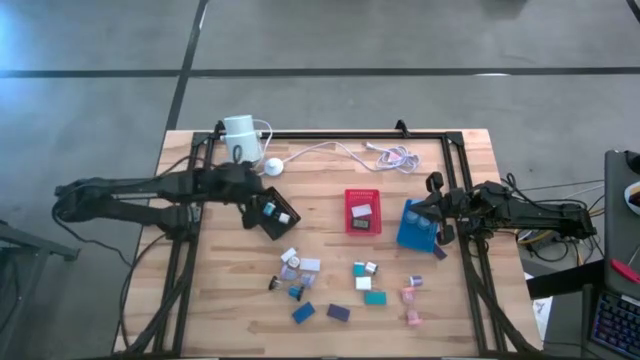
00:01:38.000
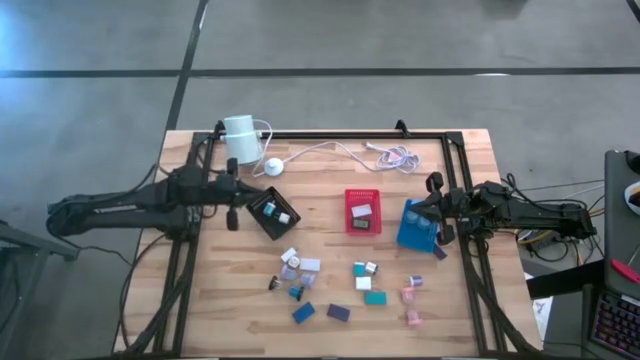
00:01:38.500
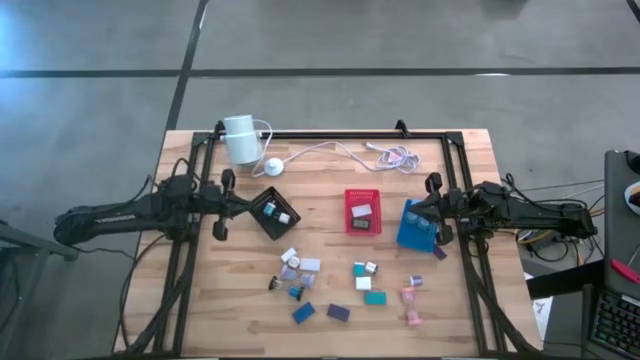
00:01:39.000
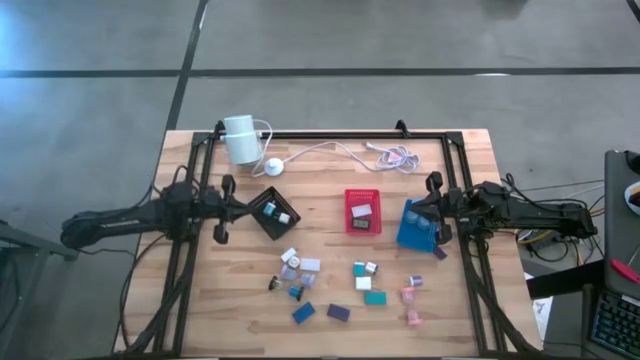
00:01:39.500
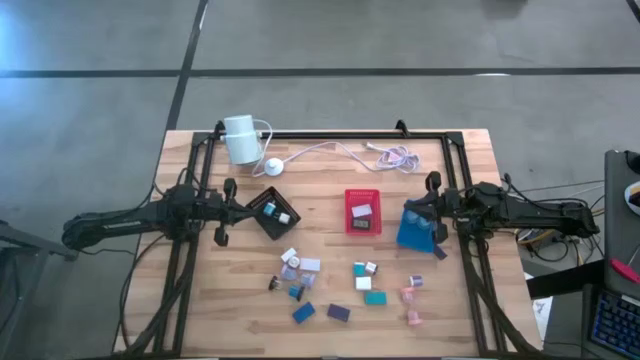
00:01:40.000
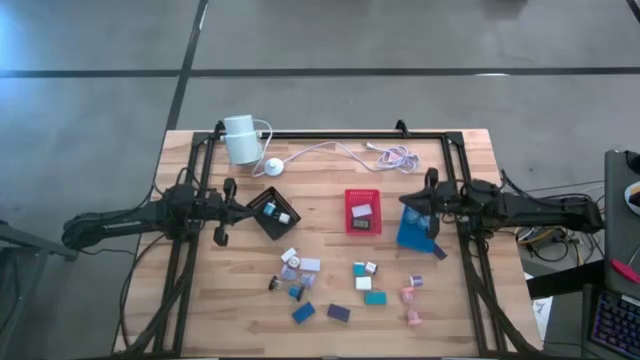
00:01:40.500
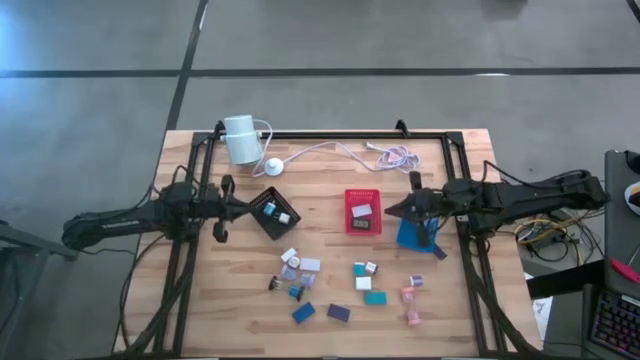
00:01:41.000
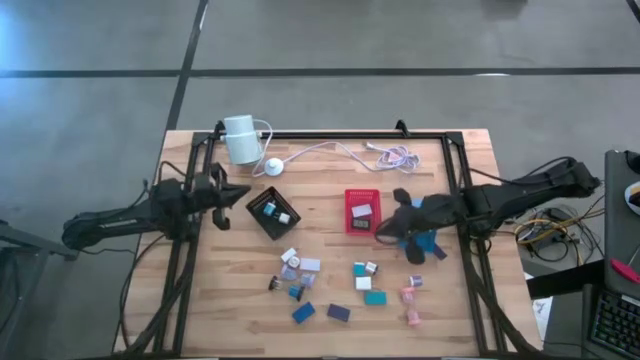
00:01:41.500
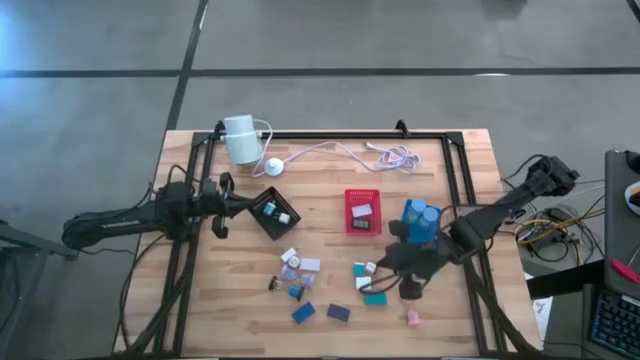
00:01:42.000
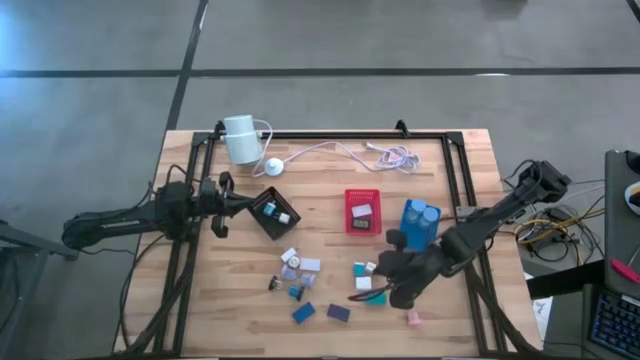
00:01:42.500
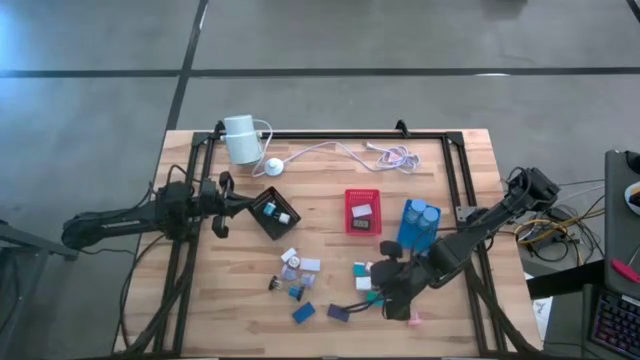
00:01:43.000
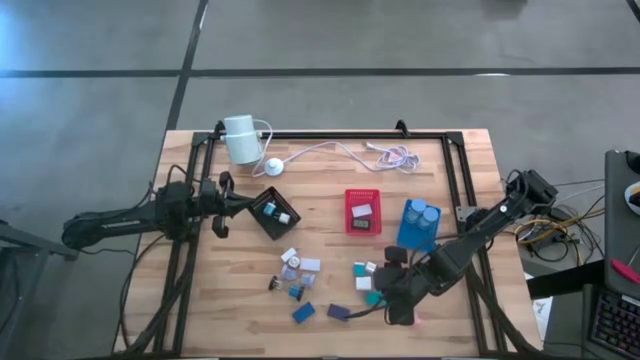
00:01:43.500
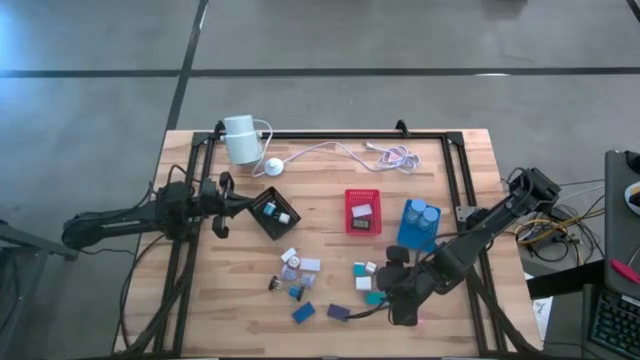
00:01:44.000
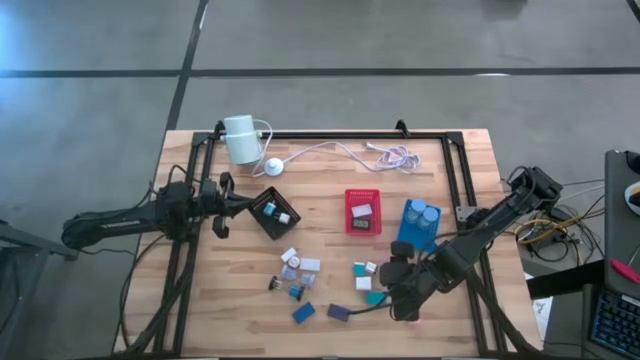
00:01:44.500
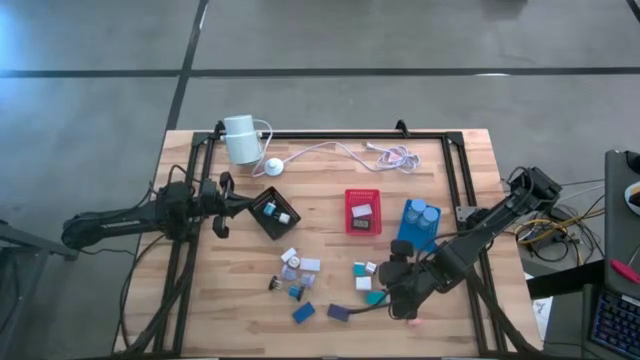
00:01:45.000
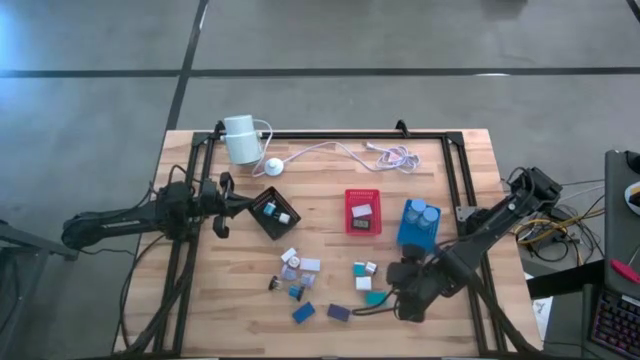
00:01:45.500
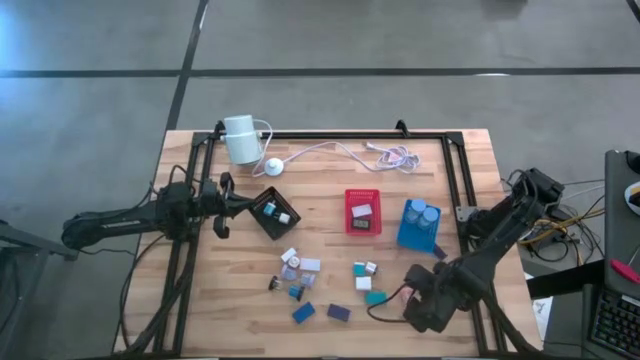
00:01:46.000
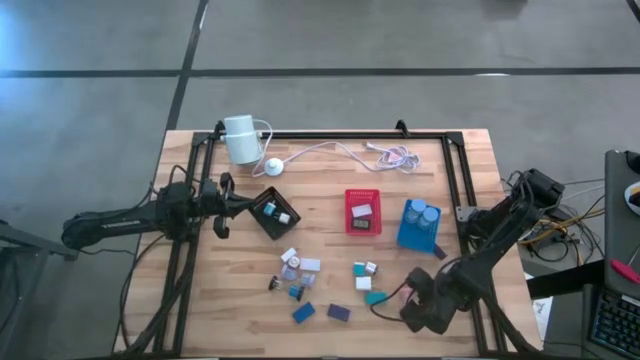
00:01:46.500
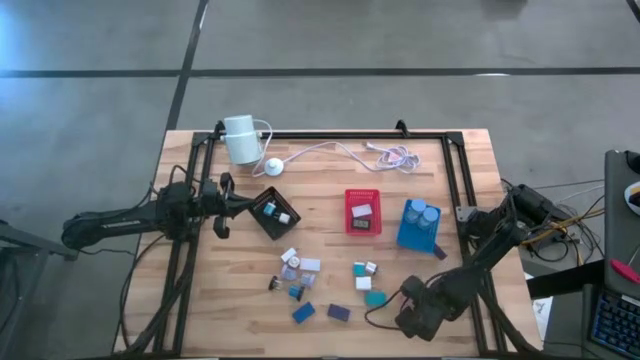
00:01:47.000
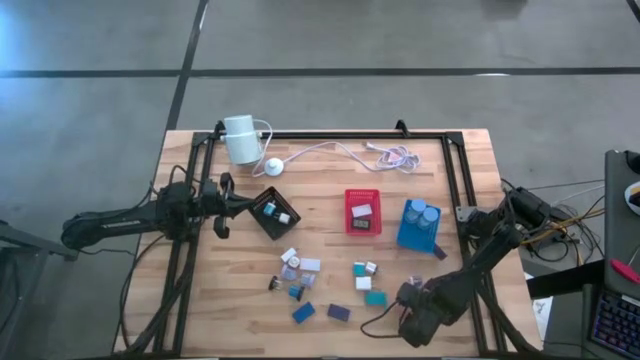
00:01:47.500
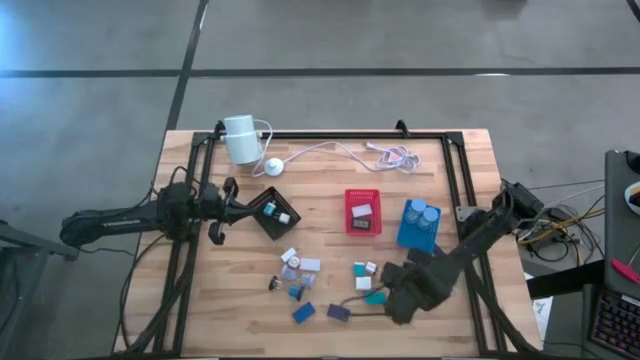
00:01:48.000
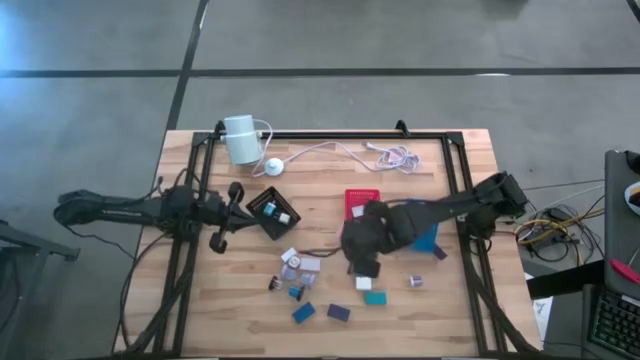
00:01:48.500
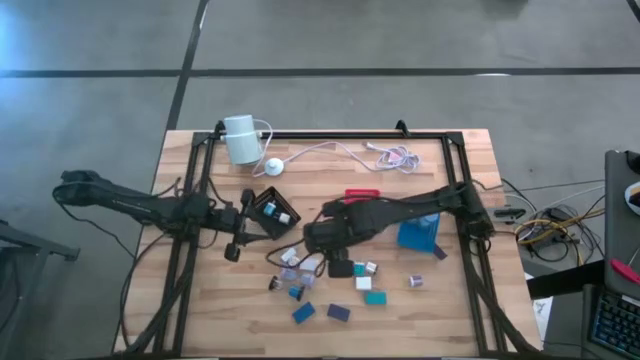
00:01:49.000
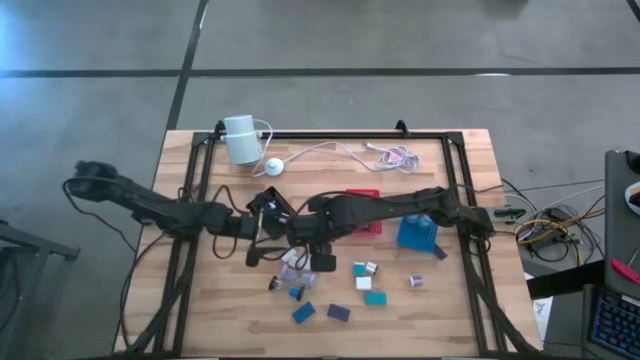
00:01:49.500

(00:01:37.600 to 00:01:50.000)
Task: Pick & Place Office items
Put the pink hourglass into the blue bin

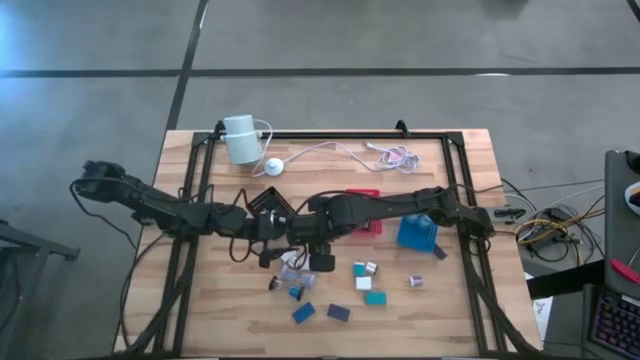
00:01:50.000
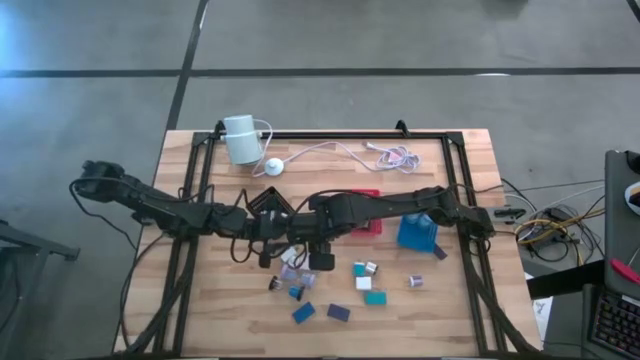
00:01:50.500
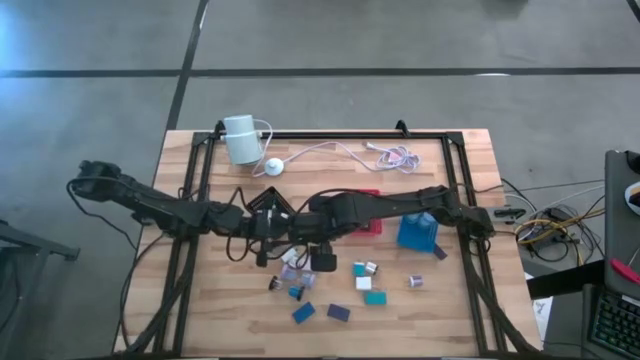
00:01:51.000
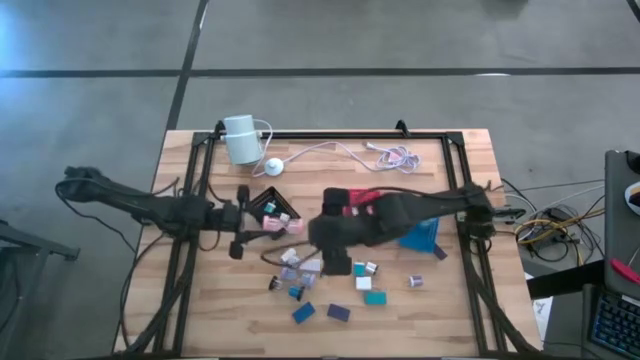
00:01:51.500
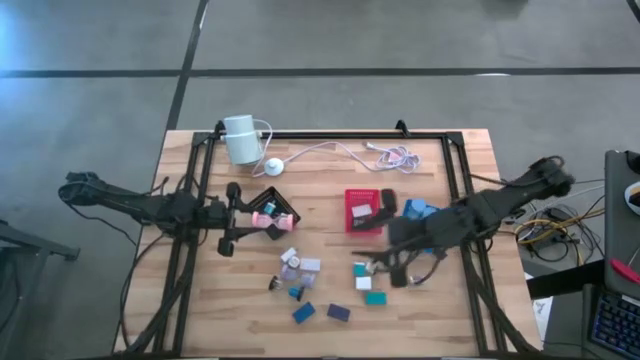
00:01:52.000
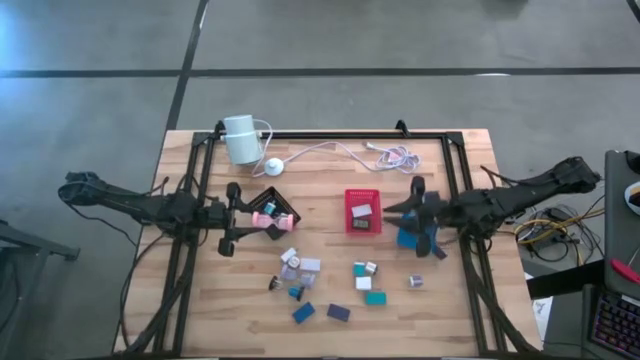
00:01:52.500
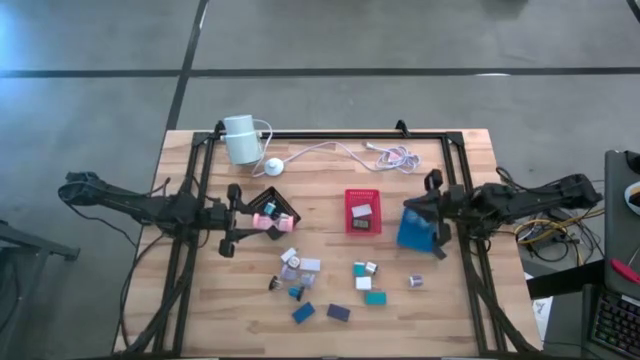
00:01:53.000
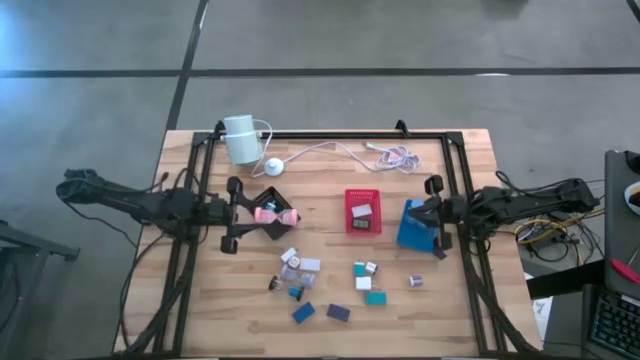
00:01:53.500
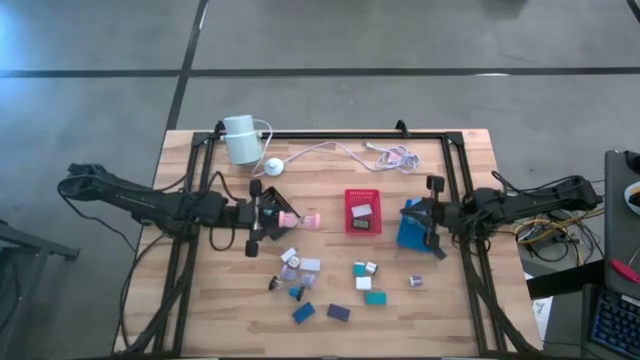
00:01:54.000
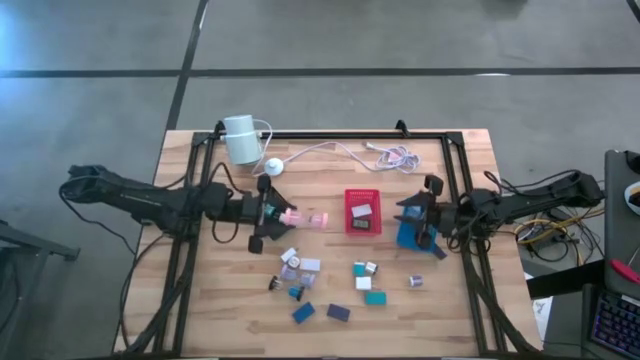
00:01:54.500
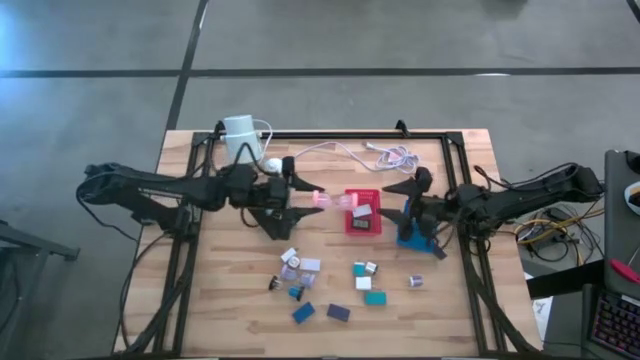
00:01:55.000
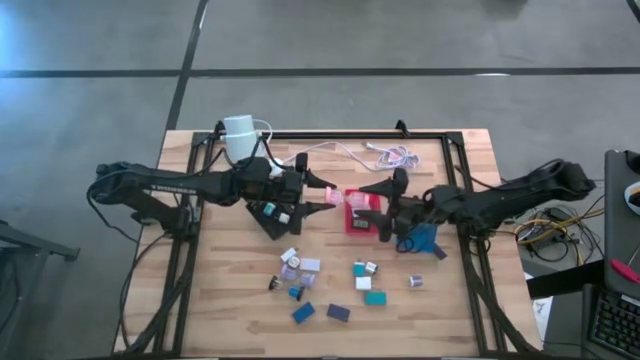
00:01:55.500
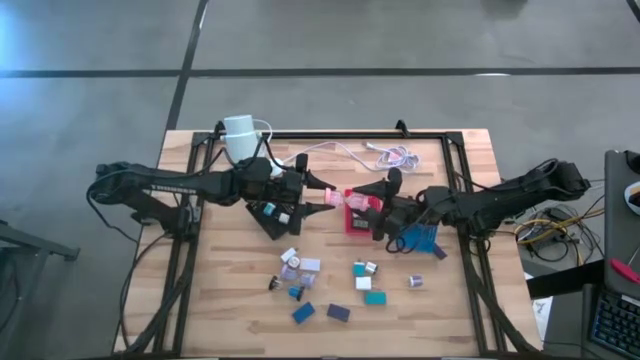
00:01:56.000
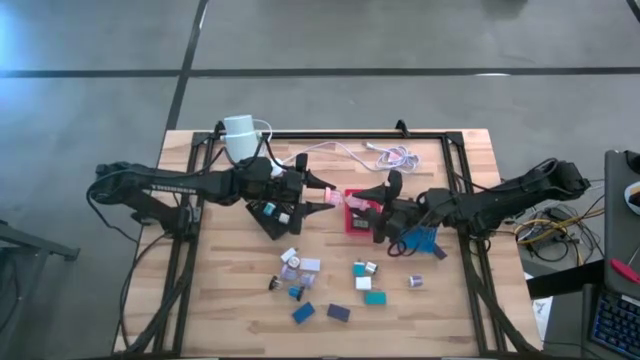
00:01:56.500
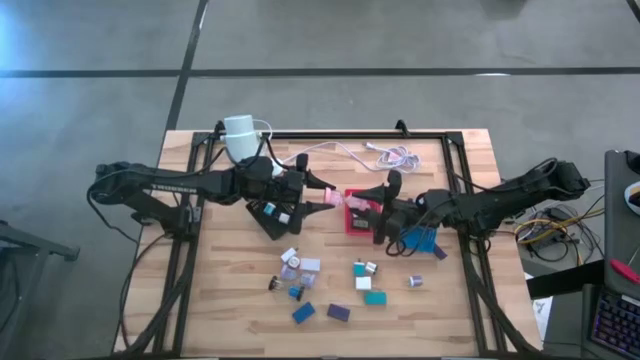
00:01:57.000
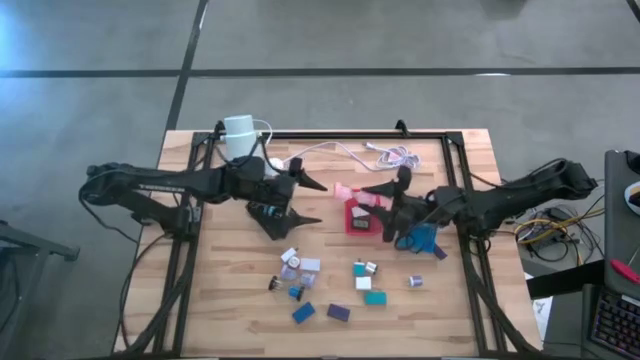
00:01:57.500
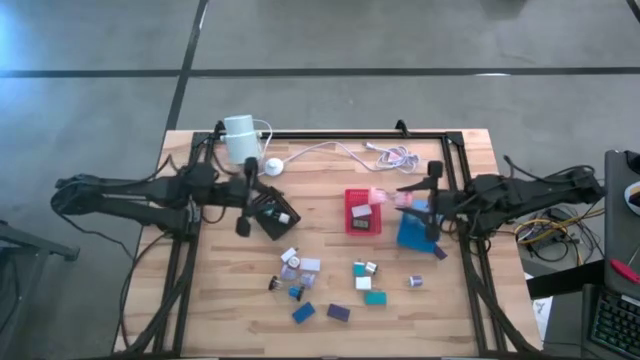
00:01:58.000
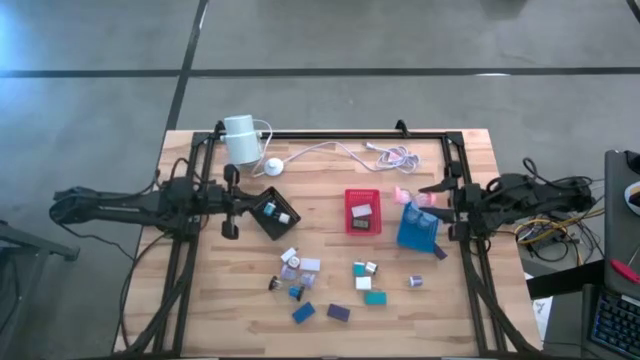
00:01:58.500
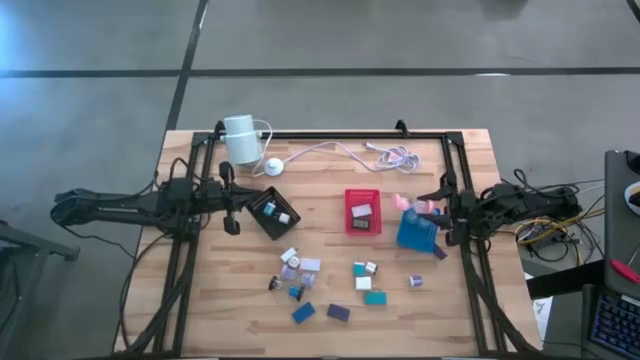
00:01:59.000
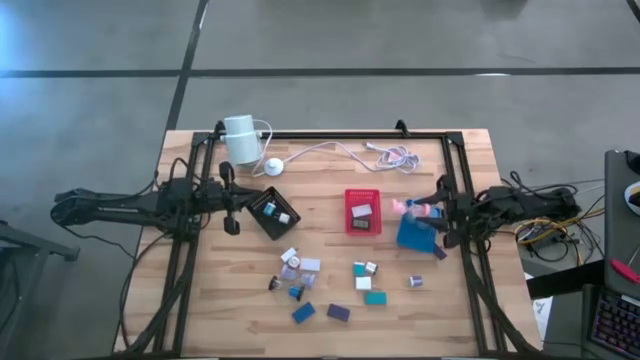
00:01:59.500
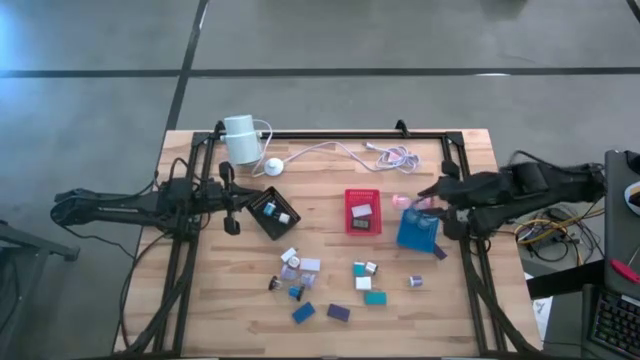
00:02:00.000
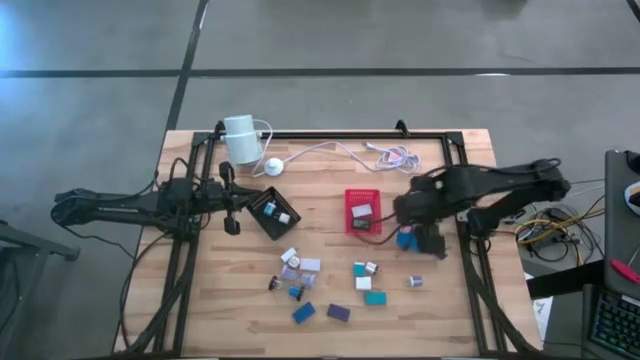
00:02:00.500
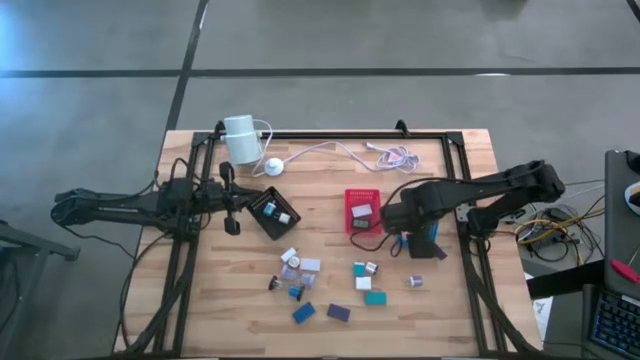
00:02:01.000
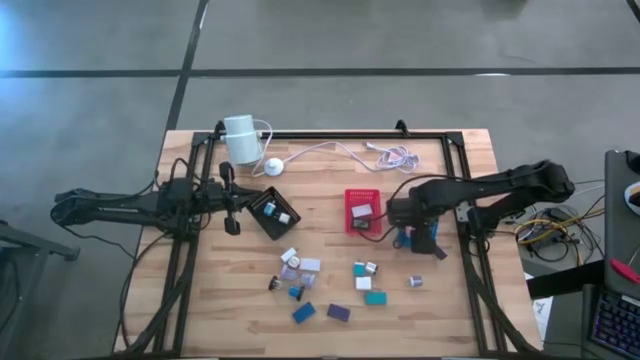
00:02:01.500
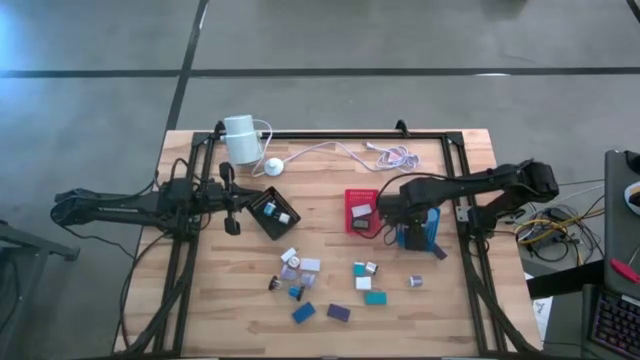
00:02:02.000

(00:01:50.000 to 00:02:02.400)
Put the pink hourglass into the blue bin
